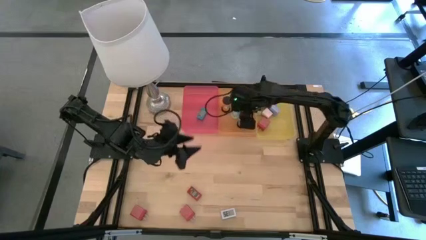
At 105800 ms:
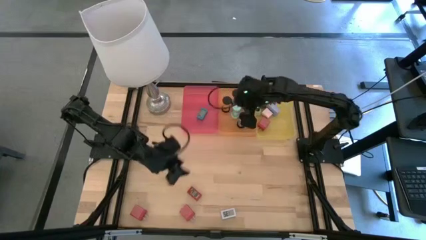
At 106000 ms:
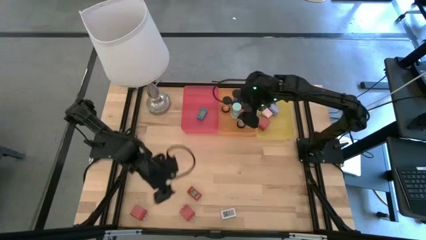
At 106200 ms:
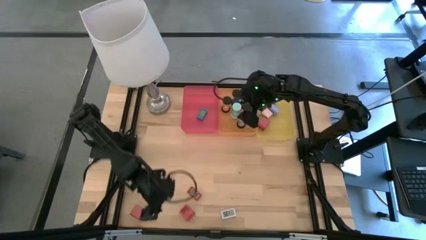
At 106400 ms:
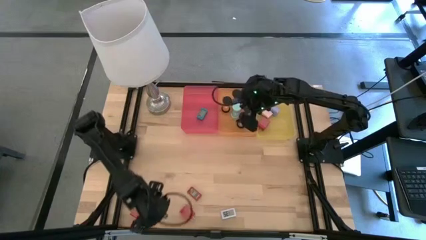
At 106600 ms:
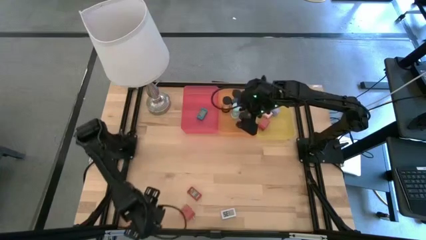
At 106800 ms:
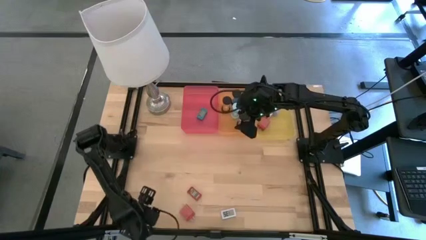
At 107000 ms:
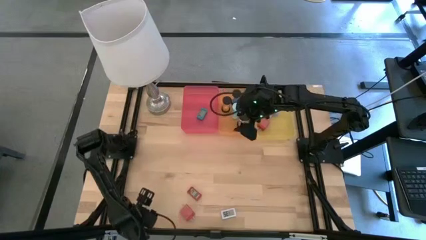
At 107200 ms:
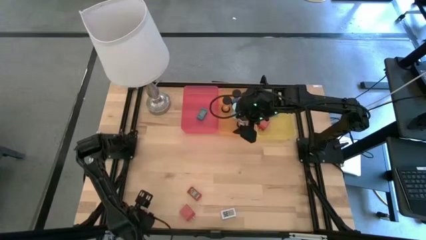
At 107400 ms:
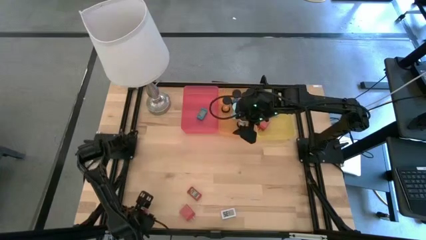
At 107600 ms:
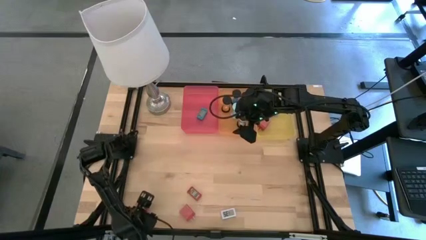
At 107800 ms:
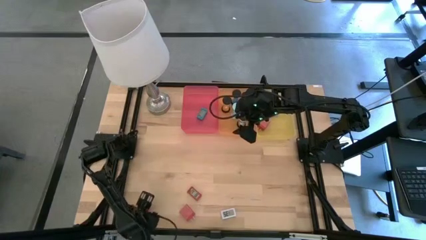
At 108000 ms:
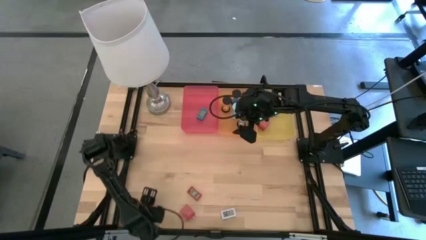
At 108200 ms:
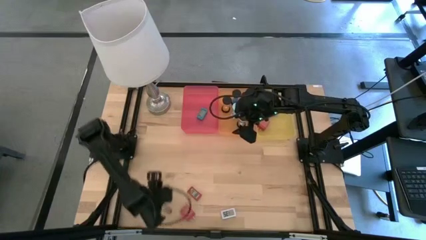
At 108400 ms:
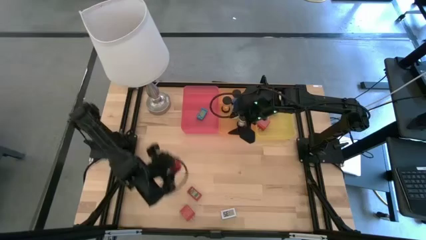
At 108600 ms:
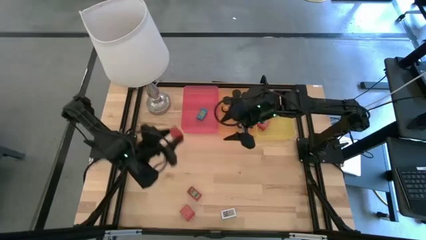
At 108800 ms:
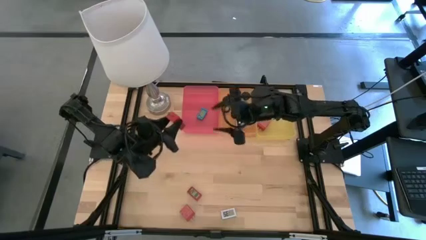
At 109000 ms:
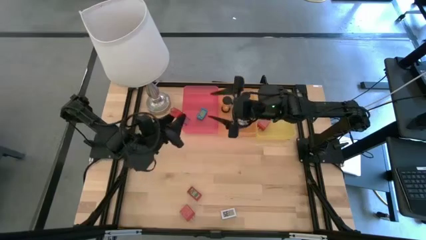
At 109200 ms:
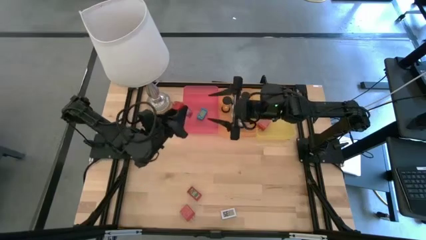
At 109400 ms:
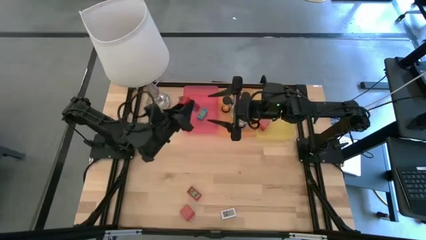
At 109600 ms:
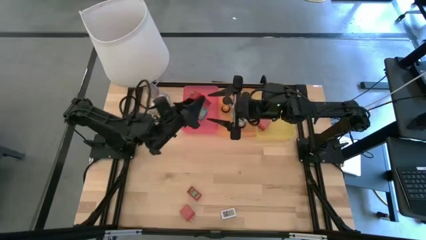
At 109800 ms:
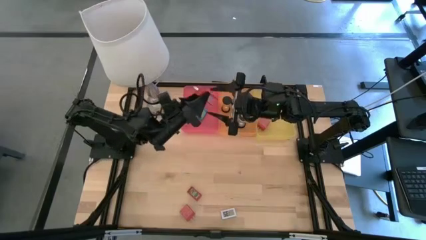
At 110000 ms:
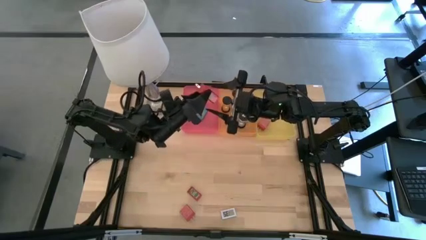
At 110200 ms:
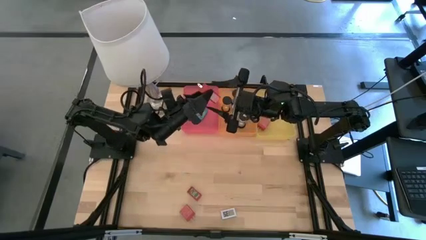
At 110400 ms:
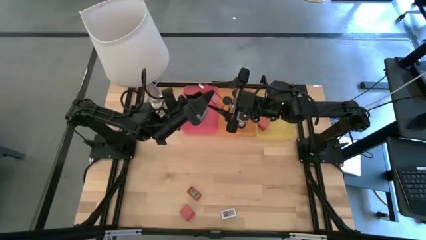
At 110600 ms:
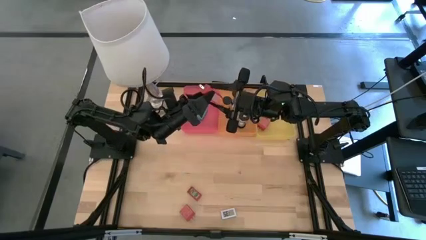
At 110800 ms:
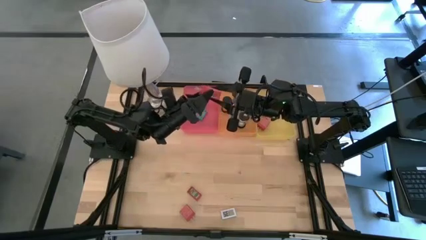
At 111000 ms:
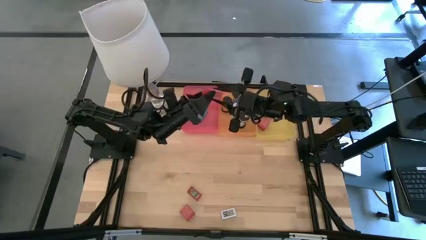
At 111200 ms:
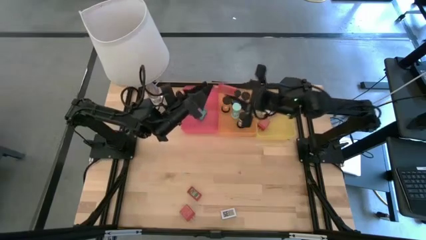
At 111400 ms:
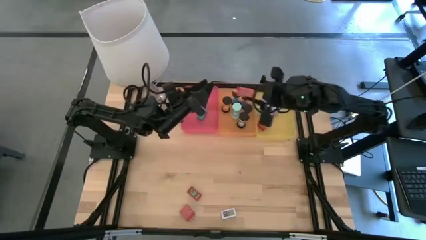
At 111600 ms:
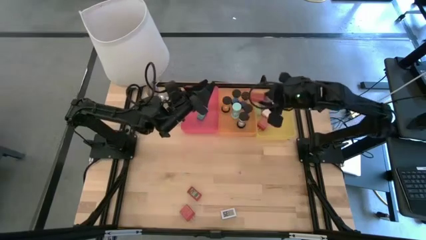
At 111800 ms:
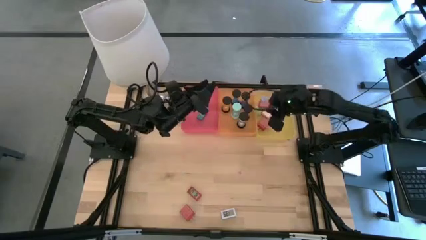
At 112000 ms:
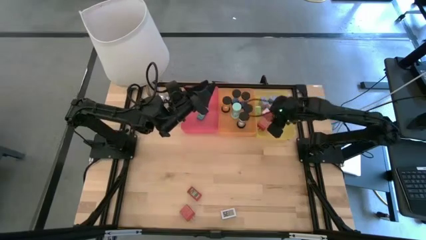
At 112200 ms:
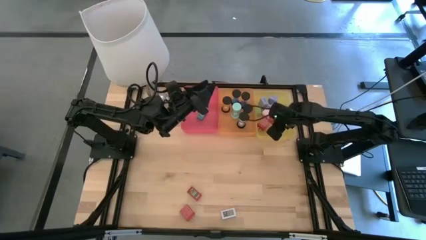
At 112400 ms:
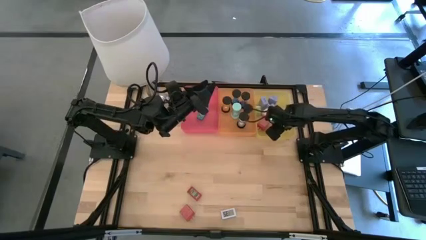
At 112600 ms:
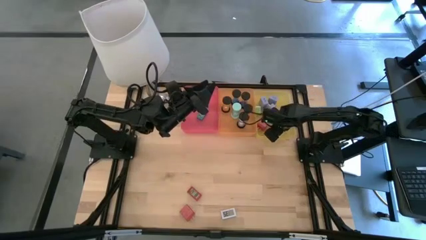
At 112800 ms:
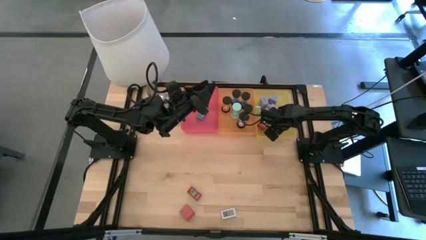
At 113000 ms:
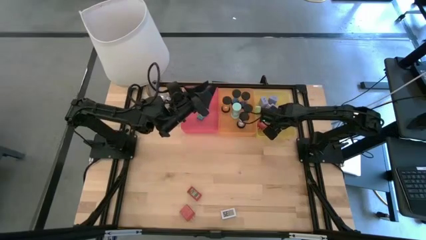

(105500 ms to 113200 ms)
Task: Pick & Place Office items
Put the left red charger adapter into the yellow bin

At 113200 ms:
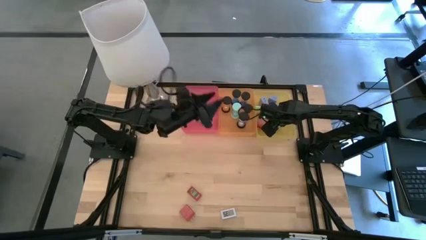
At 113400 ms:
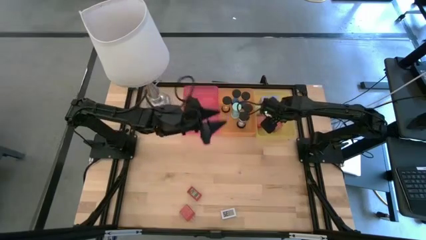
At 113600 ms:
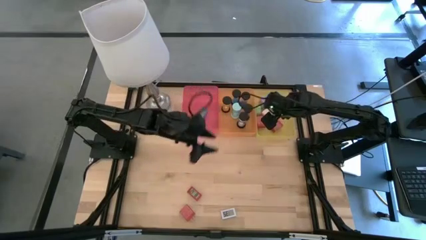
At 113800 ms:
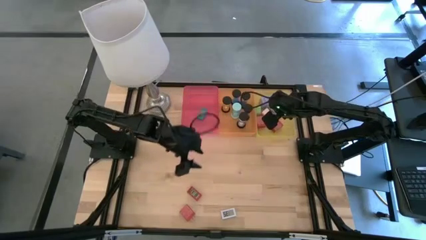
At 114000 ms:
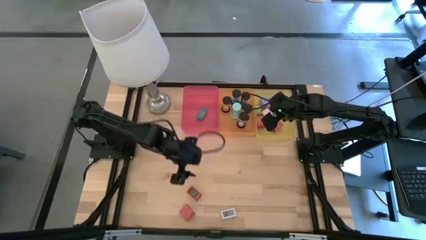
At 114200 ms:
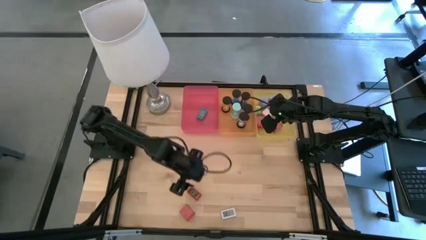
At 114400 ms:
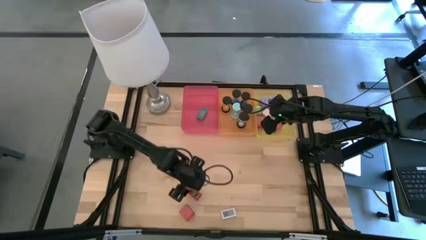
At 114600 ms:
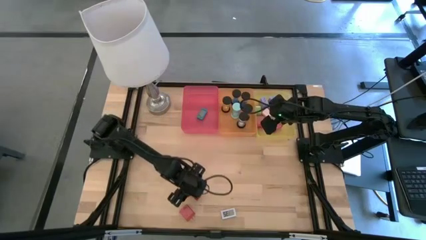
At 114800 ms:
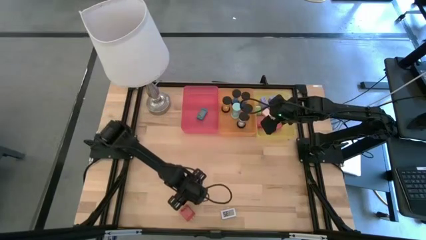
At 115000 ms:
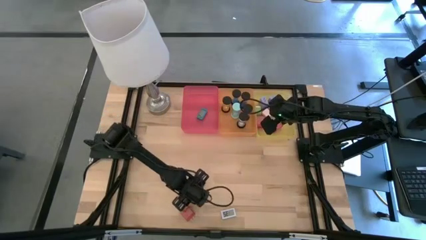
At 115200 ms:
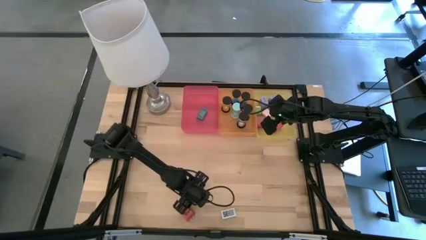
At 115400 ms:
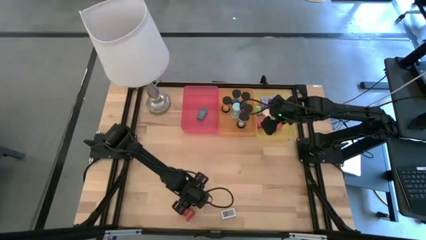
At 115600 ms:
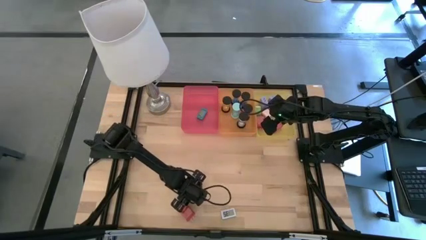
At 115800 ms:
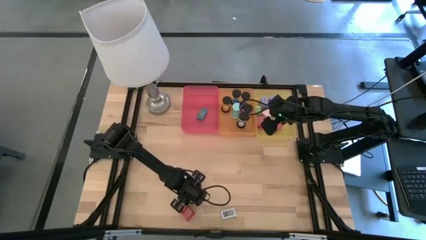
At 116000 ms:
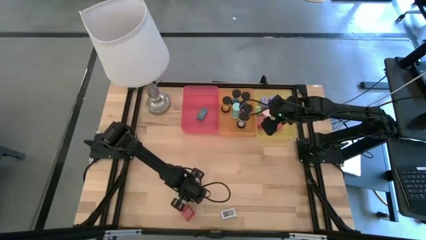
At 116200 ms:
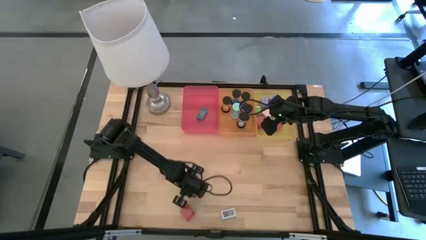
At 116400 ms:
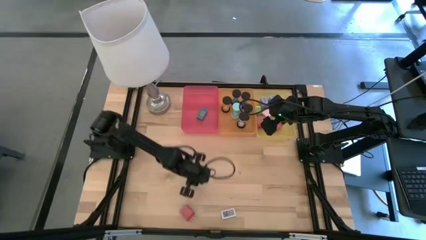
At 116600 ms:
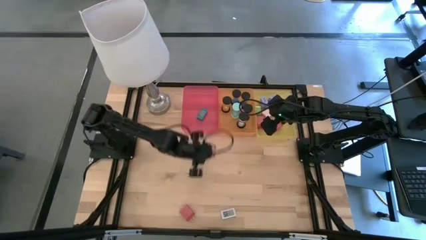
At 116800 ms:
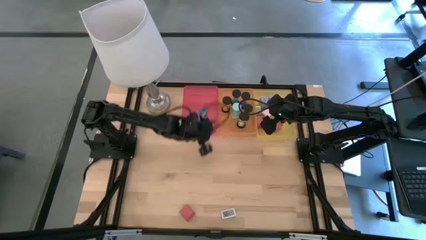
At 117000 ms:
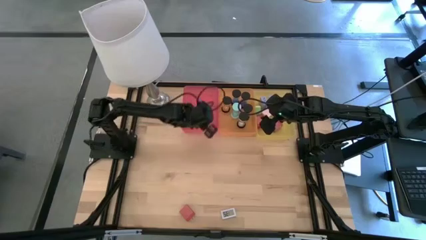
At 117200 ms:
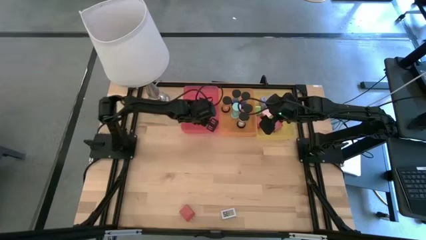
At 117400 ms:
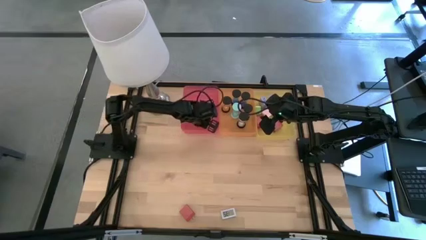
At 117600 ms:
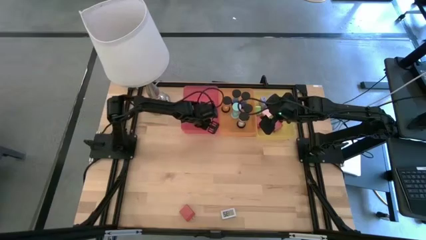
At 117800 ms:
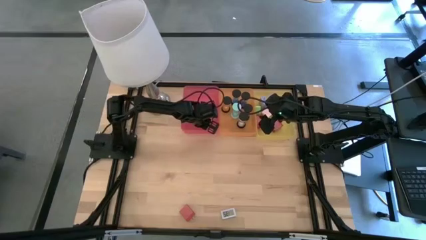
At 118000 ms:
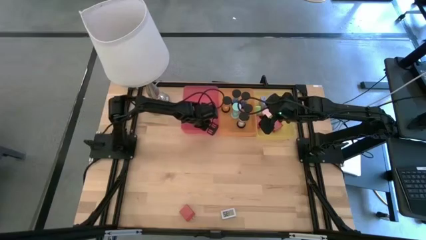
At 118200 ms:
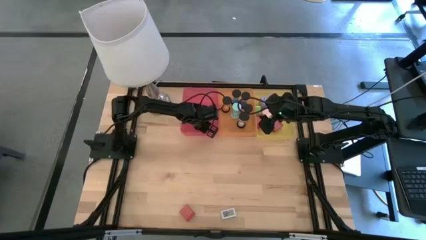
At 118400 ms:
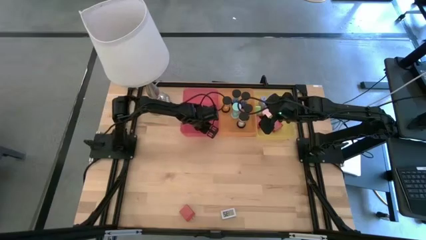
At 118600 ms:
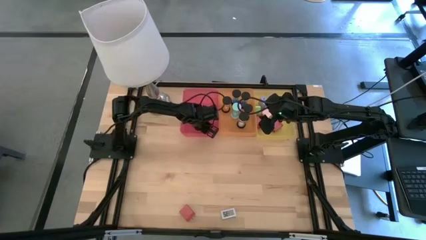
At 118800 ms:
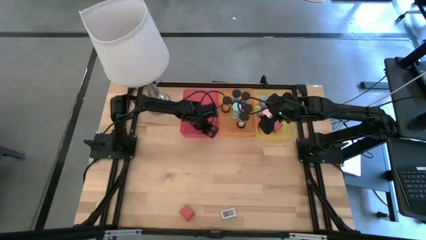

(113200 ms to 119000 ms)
Put the red digital clock into the pink bin
